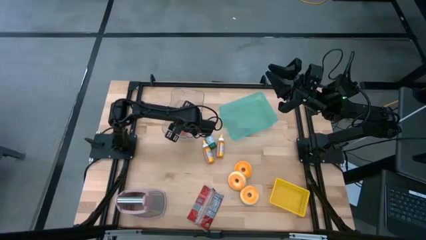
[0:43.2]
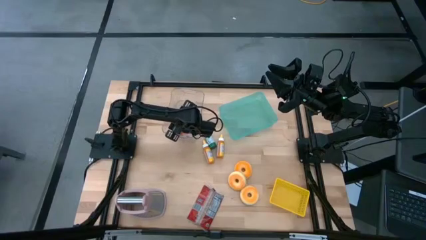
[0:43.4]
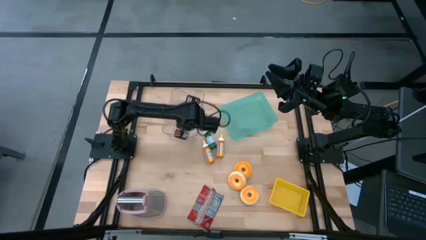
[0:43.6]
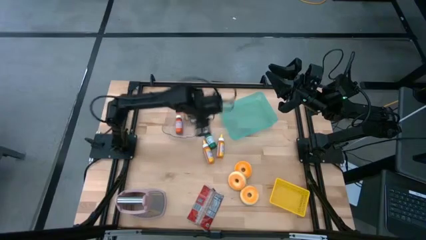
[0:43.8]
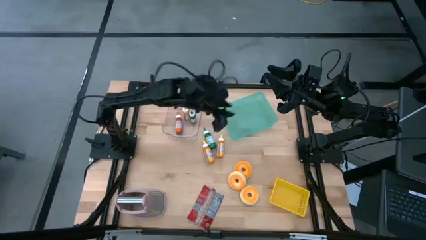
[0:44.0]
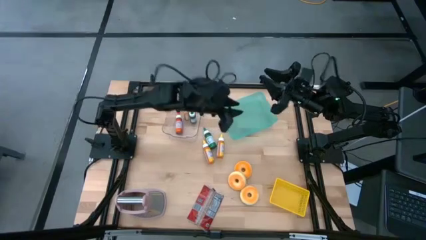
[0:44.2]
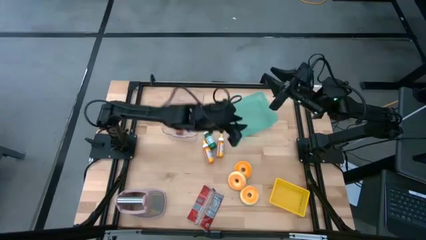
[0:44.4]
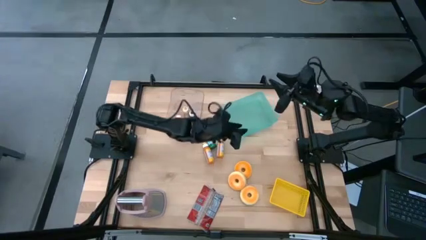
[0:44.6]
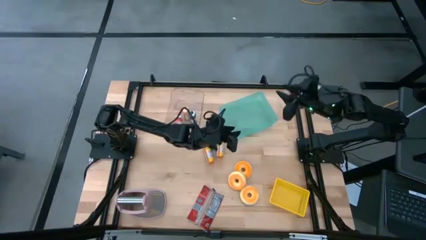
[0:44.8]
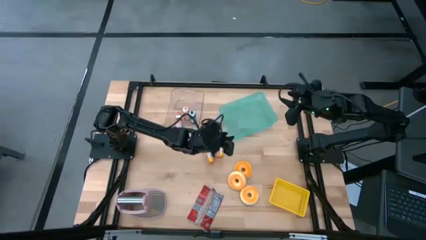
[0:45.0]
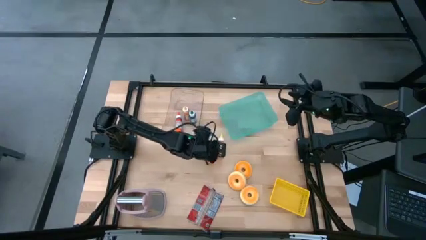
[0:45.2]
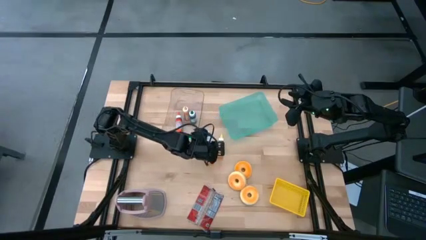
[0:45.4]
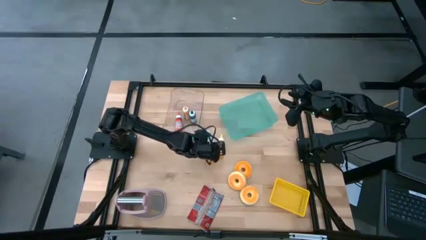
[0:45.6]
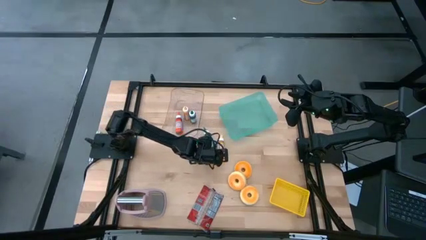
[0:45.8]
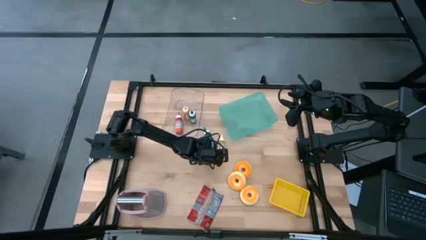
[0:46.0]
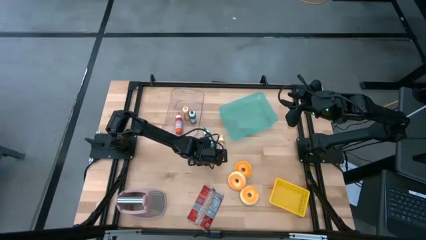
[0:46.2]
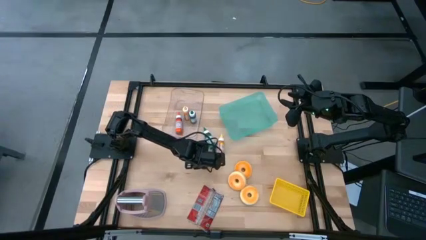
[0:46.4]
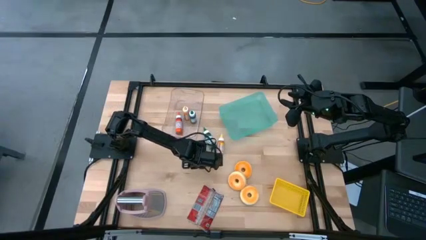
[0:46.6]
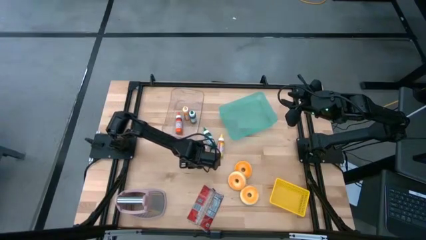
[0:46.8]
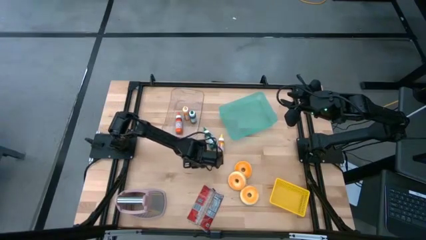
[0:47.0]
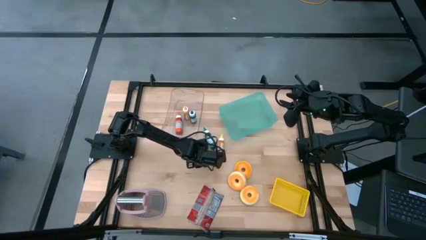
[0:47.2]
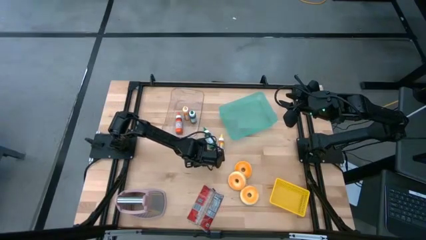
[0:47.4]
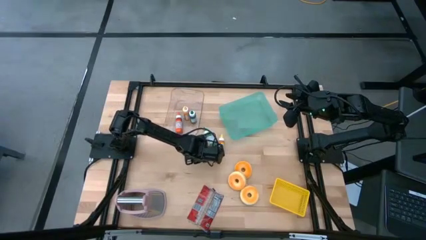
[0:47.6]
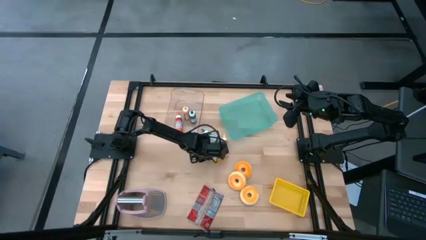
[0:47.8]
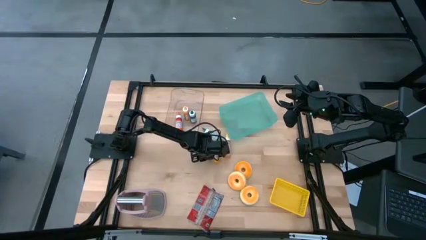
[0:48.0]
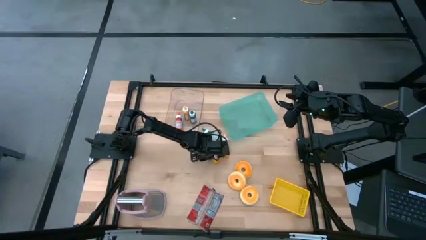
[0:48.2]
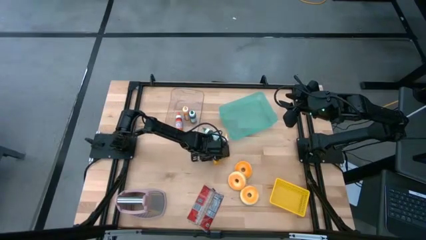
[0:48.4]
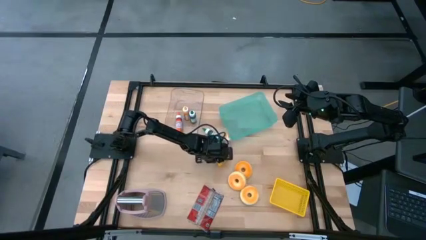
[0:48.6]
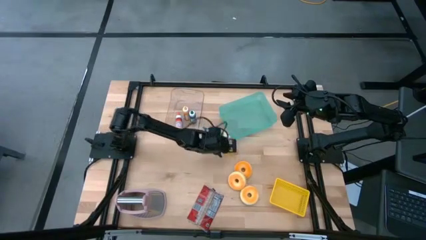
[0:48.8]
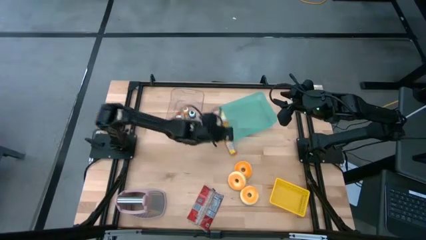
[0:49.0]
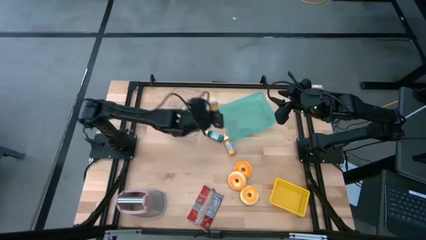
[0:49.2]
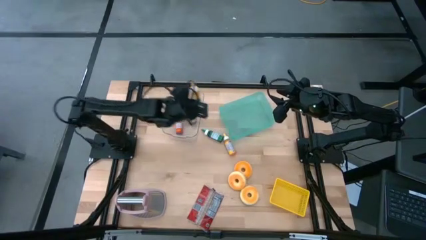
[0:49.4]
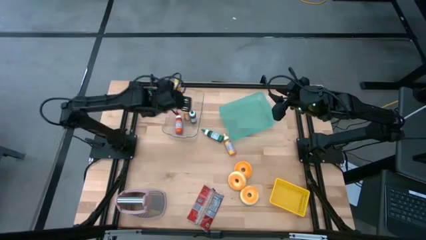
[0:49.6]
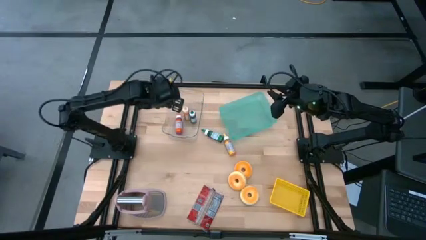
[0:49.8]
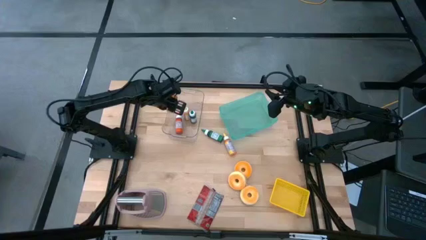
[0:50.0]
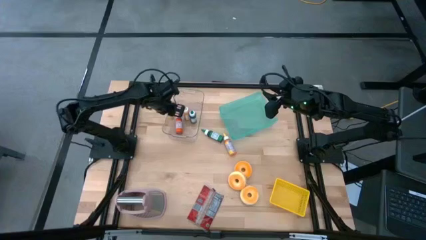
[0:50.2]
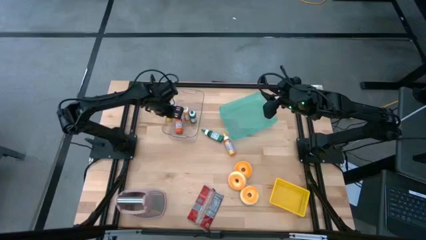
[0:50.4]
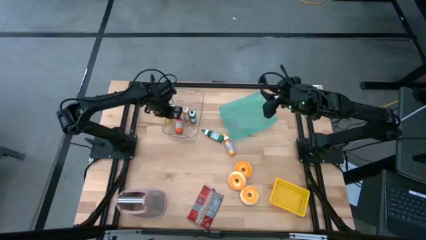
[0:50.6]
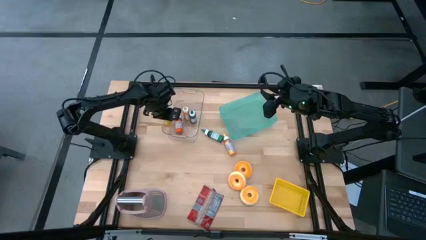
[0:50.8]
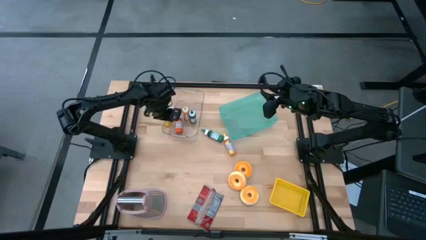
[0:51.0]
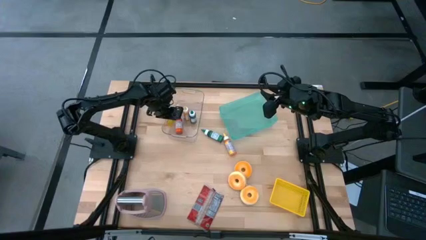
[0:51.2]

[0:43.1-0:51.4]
Put the left yellow food coloring bottle into the transparent bin

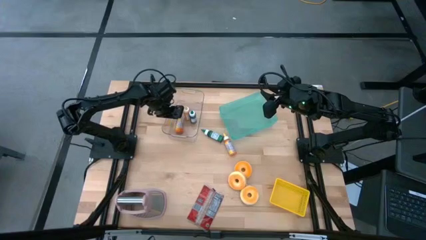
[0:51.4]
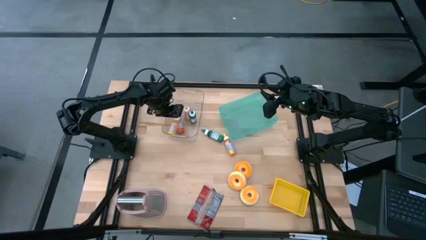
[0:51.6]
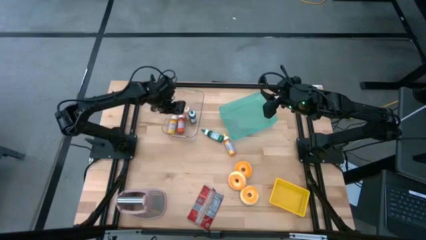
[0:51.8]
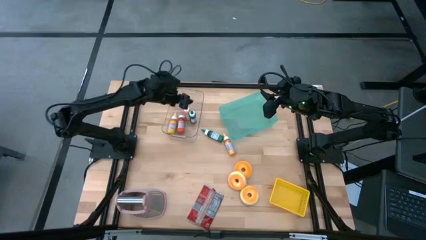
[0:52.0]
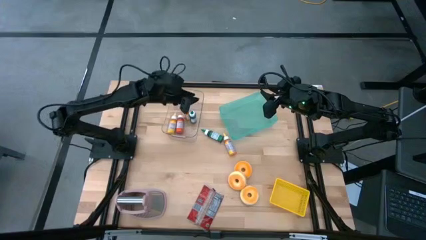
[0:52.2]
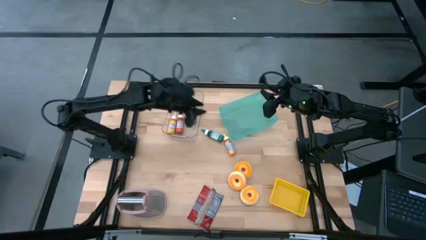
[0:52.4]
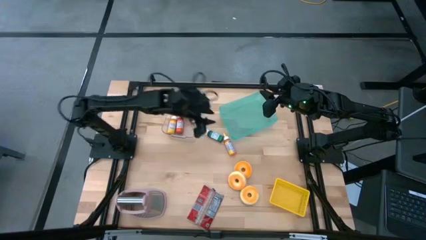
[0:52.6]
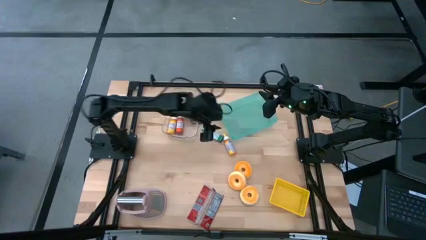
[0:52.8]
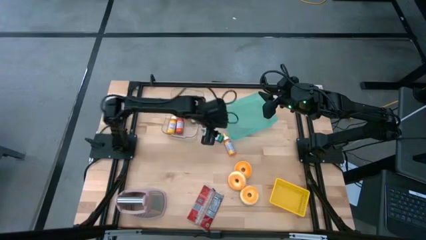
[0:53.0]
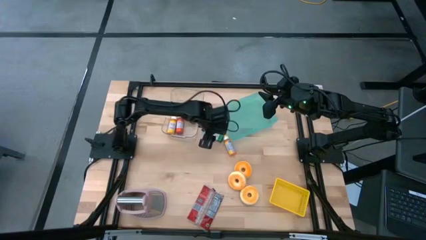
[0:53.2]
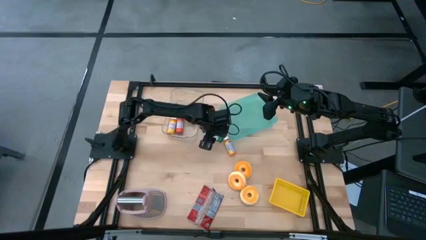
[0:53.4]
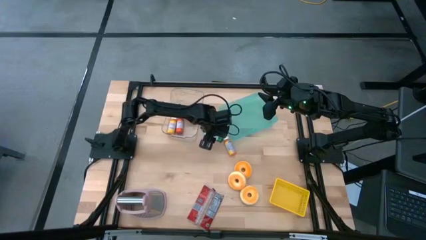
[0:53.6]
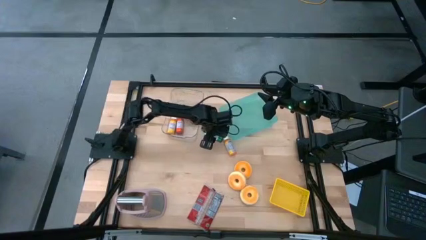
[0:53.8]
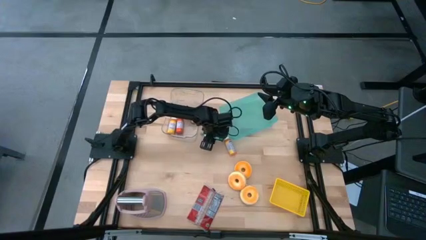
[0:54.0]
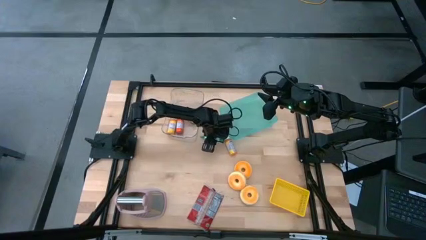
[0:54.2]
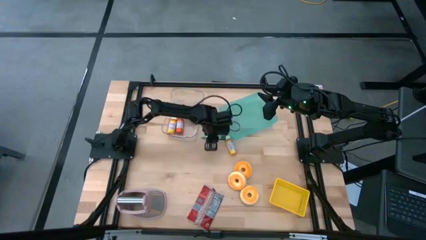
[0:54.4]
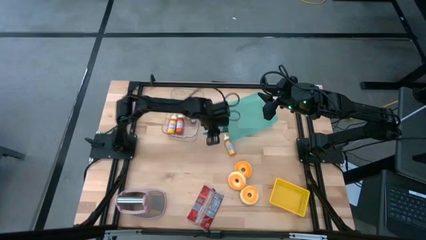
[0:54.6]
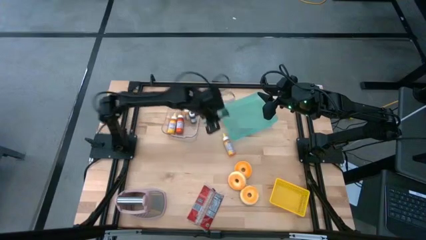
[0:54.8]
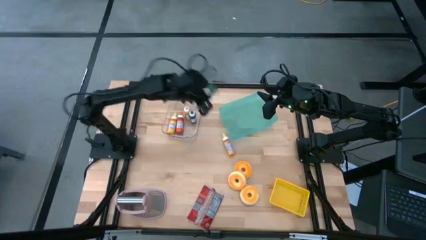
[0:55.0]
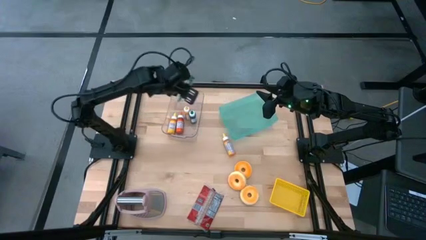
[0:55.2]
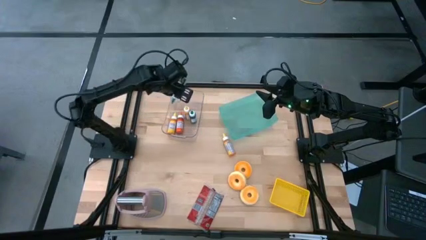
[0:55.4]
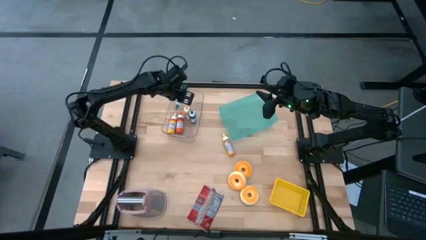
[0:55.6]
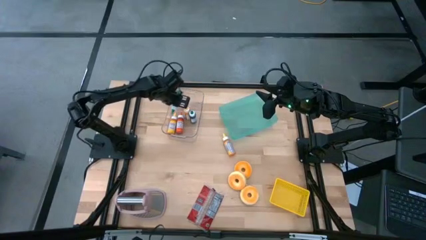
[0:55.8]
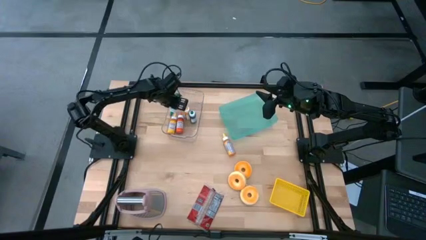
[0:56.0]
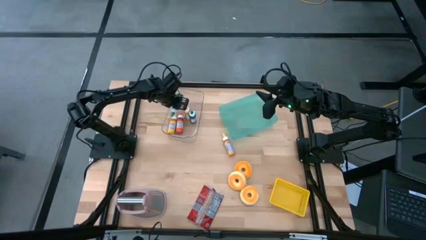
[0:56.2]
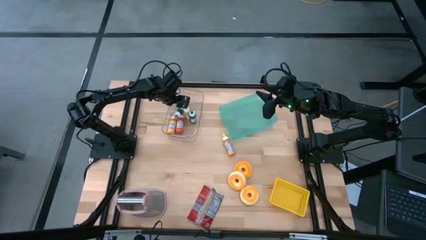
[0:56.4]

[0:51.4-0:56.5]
Put the green food coloring bottle into the transparent bin
